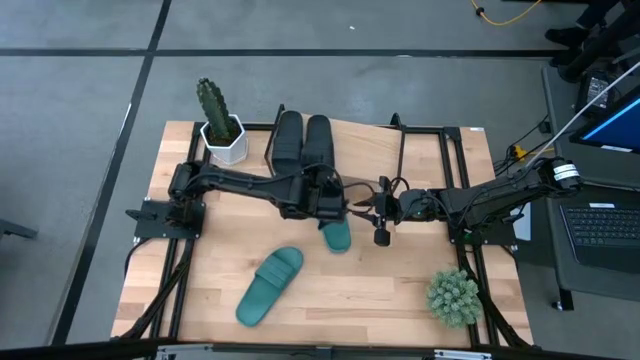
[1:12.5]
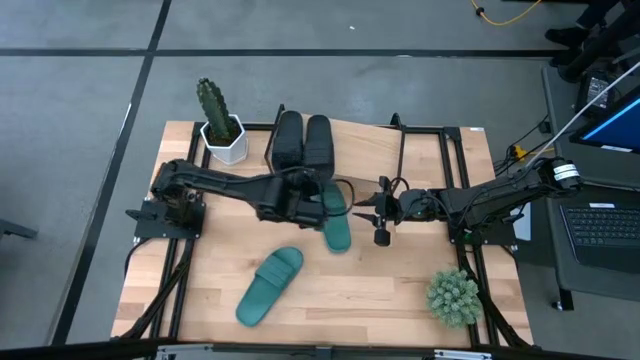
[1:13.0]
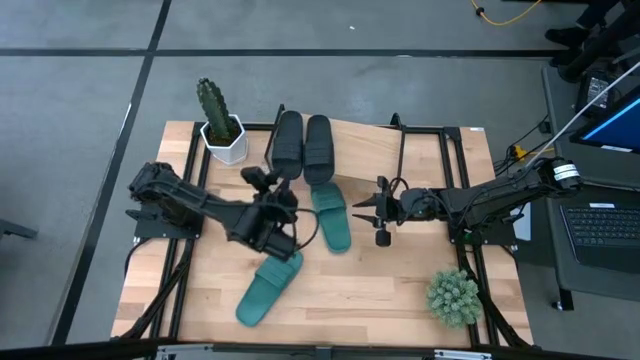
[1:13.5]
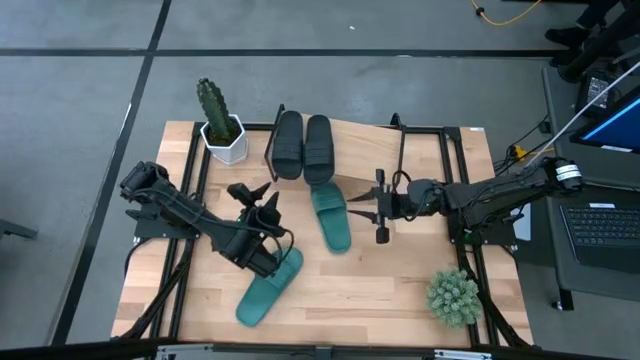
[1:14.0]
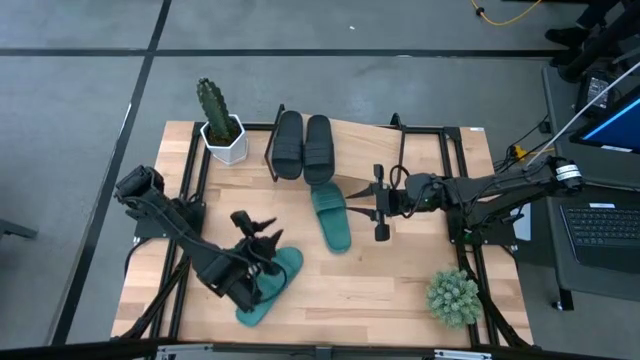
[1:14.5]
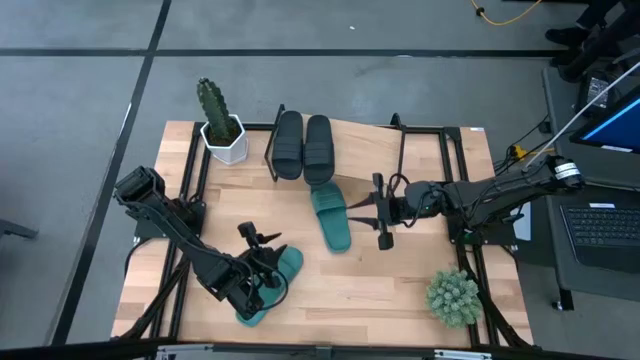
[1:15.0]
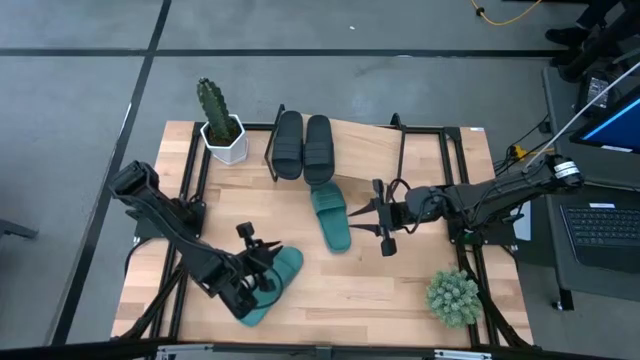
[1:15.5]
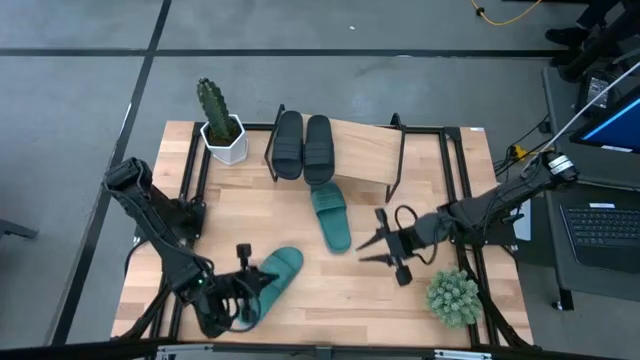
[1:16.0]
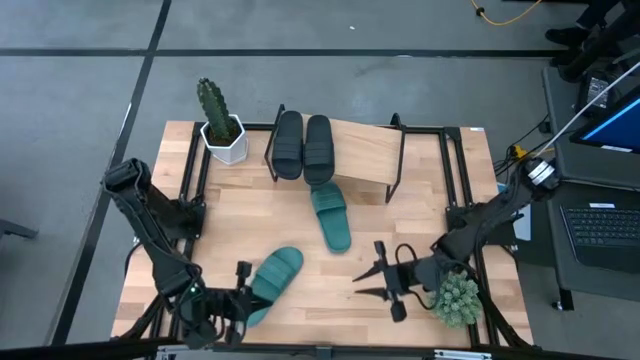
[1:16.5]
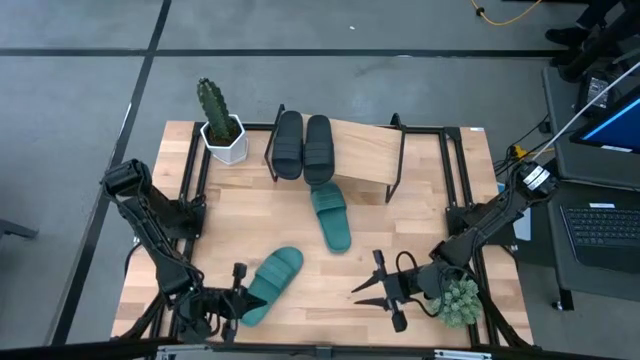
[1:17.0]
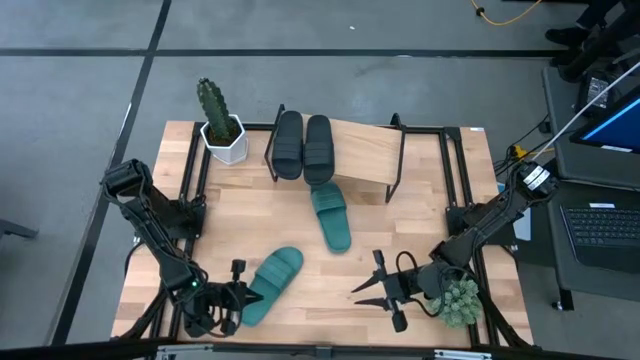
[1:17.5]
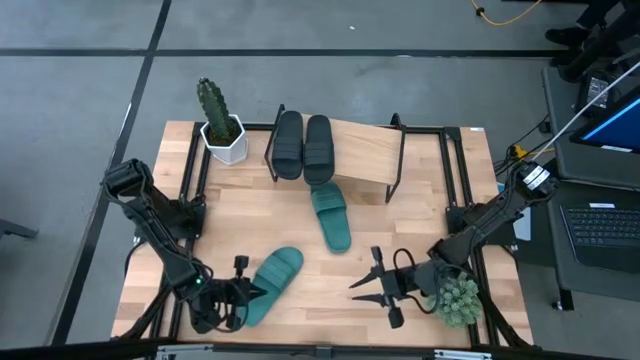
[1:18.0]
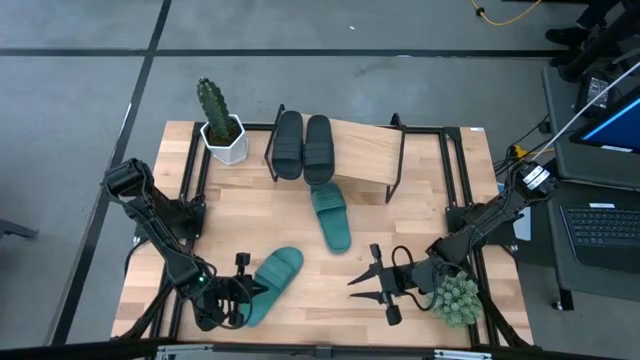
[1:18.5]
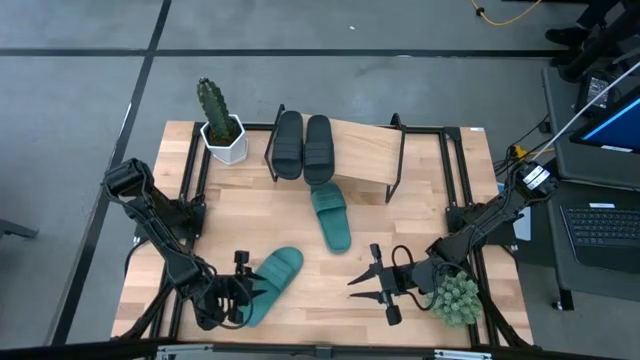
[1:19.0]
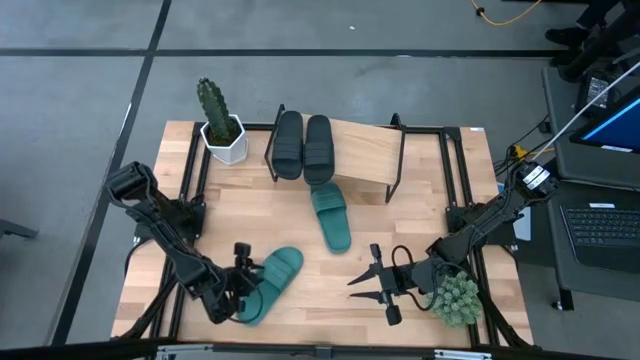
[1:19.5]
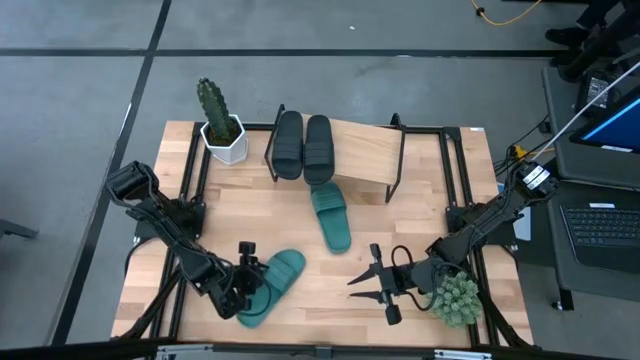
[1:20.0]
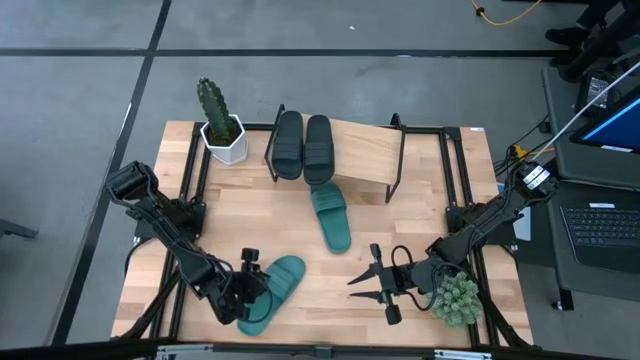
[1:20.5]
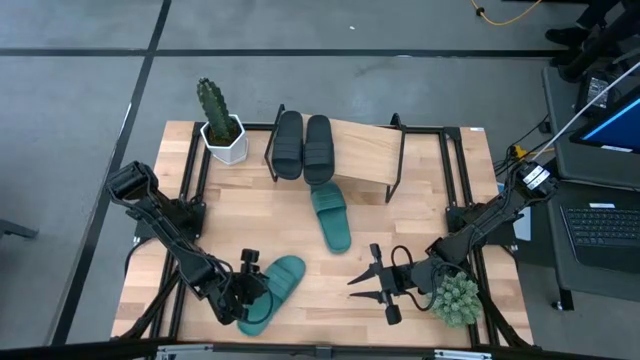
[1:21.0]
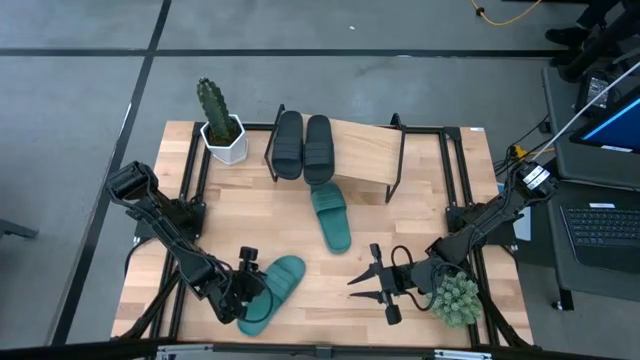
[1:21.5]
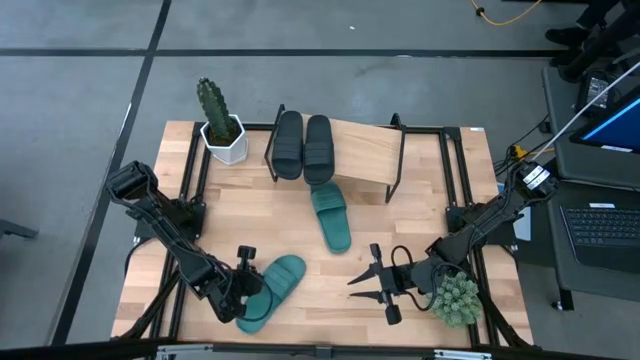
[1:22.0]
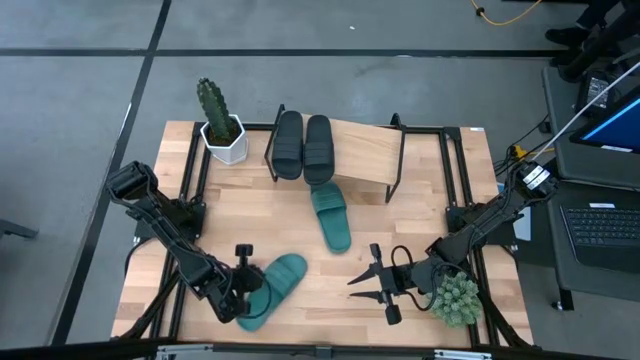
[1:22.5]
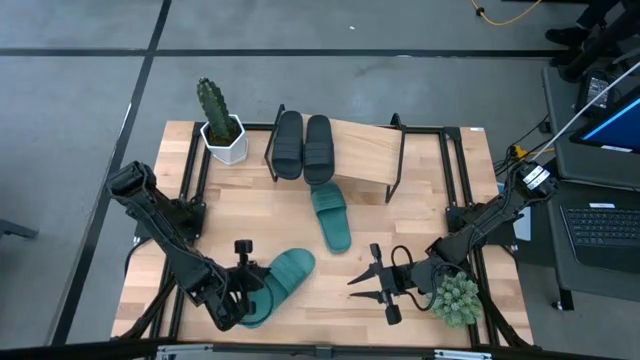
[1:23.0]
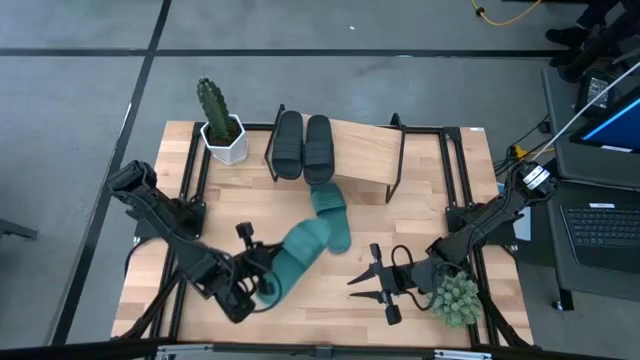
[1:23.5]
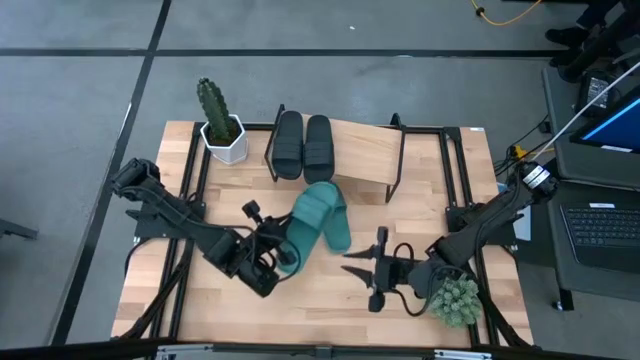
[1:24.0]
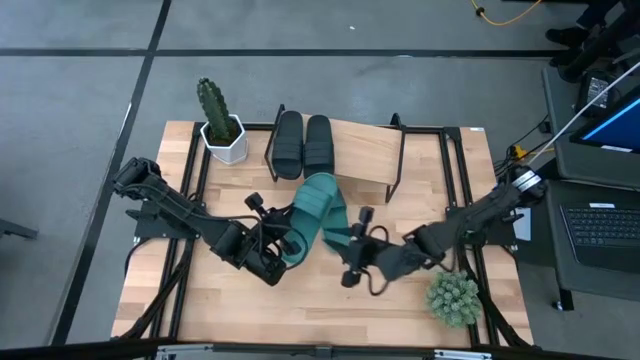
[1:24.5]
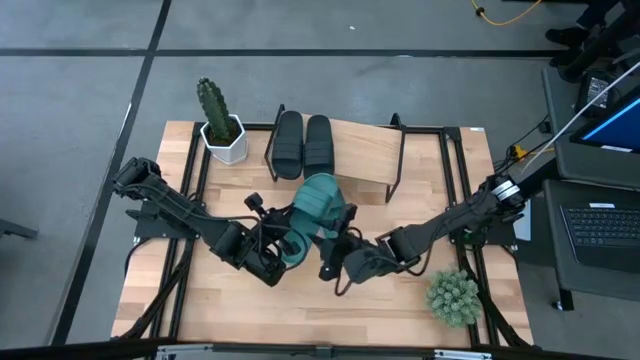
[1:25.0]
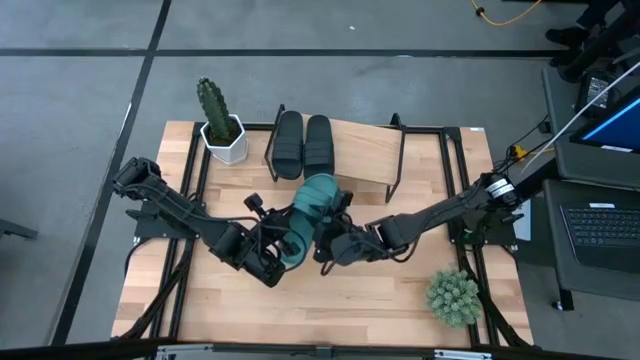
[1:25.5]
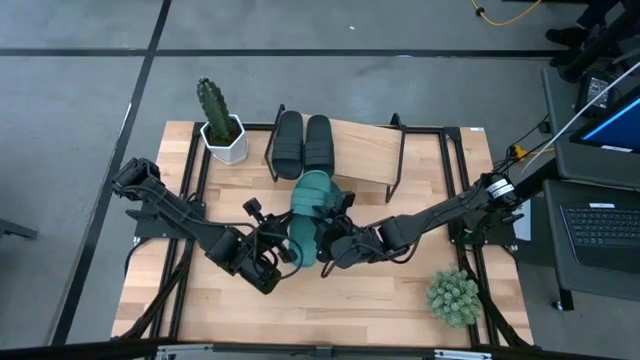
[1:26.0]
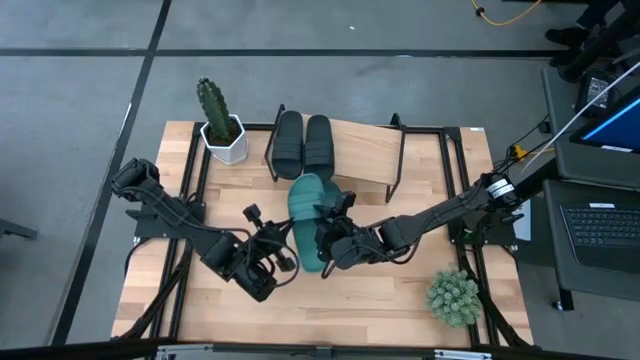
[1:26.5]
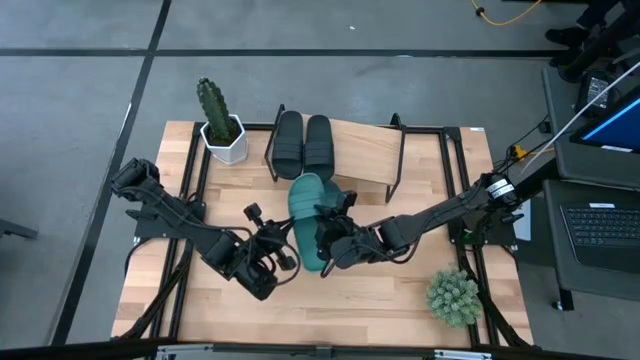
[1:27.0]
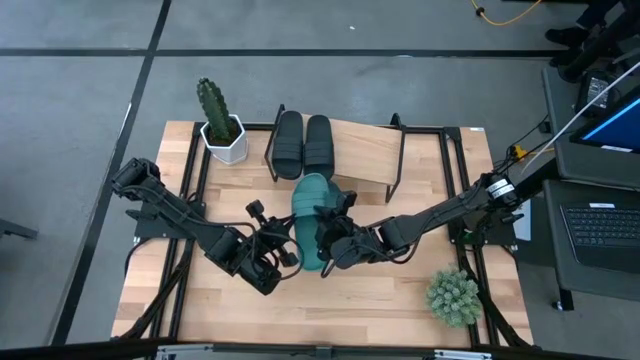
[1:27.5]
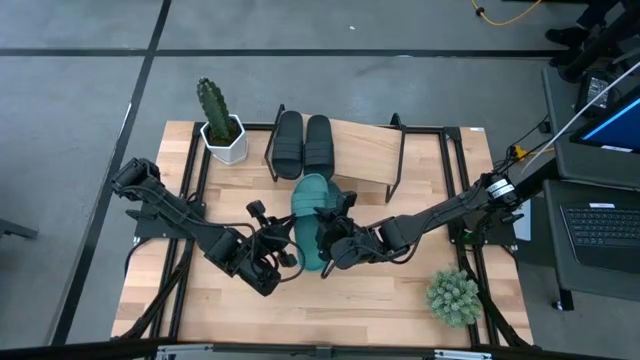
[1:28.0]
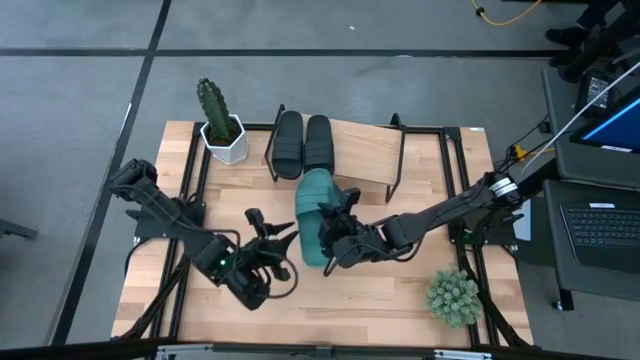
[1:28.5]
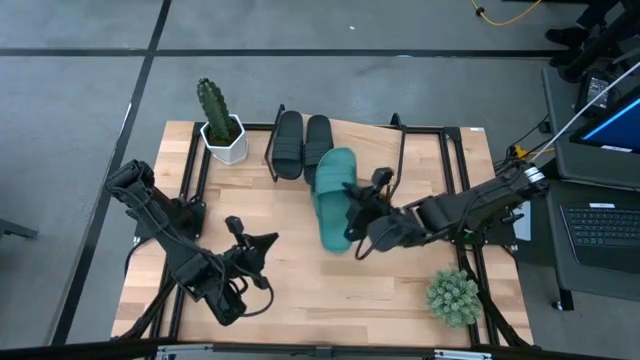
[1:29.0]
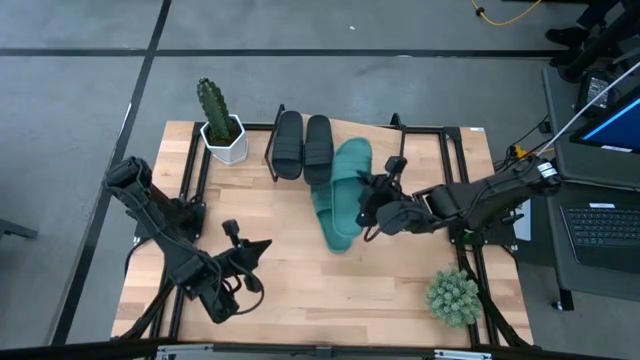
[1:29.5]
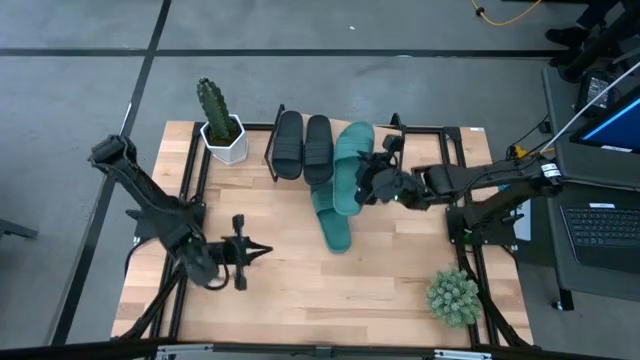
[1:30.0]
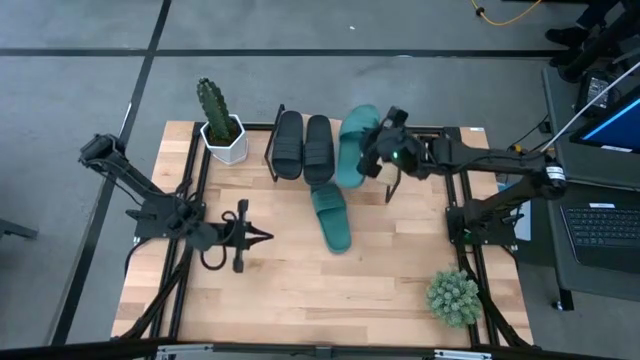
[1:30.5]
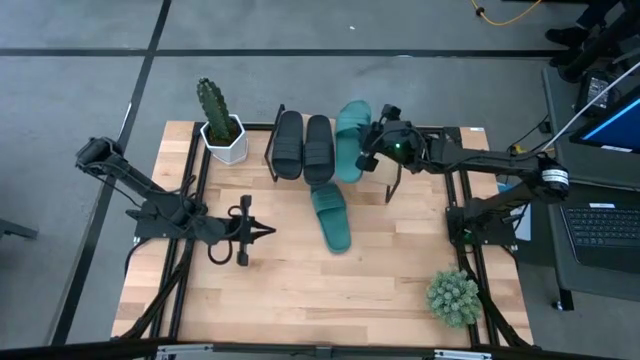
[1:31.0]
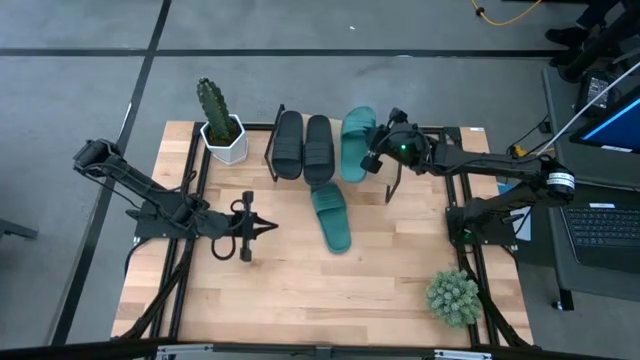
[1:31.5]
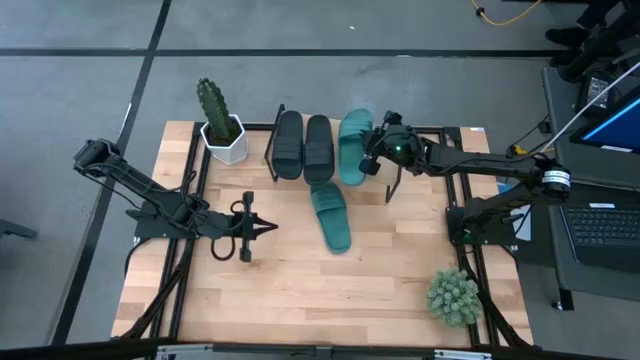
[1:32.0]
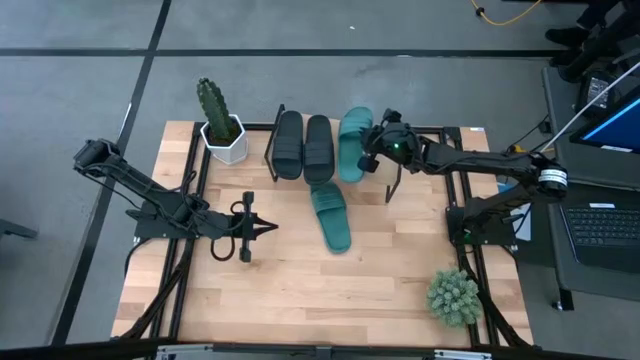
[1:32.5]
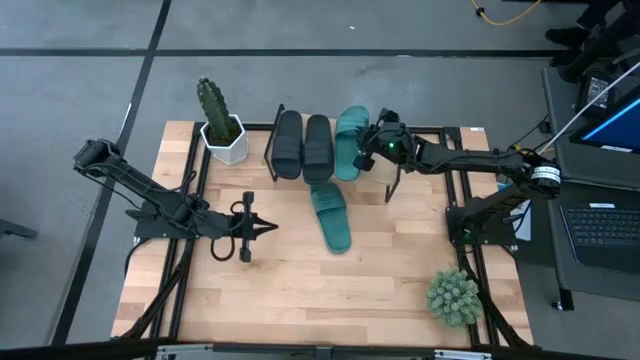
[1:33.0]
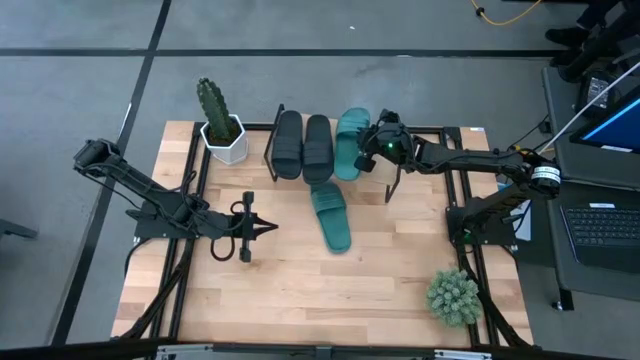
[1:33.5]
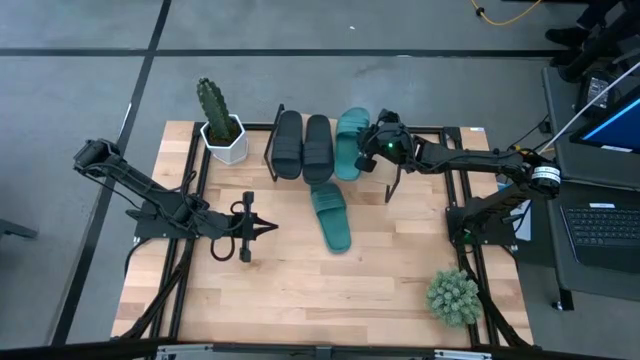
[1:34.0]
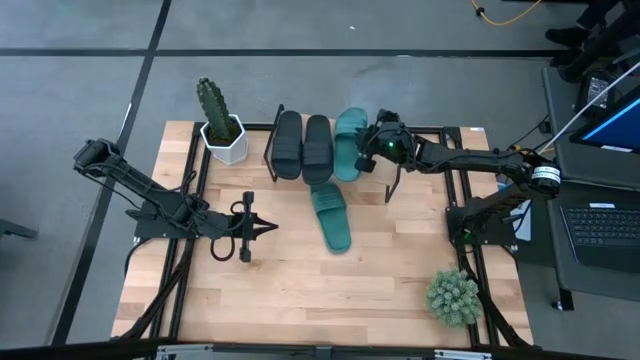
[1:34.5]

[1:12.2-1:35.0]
Task: Pick and place slides into the shelf
Put the bottom green slide on the shelf
